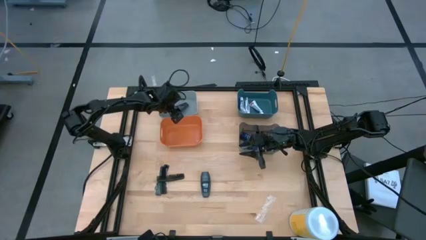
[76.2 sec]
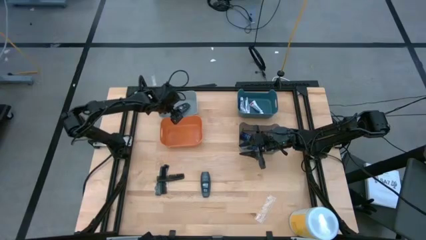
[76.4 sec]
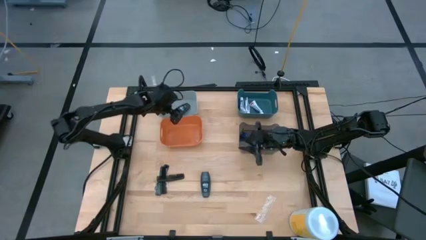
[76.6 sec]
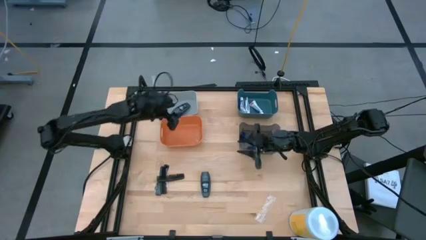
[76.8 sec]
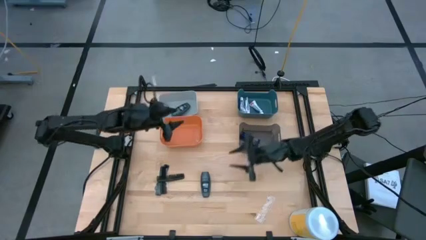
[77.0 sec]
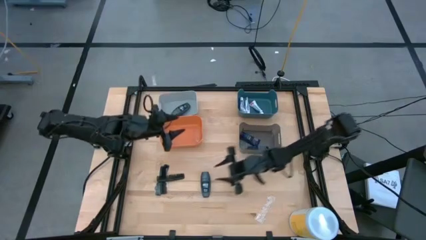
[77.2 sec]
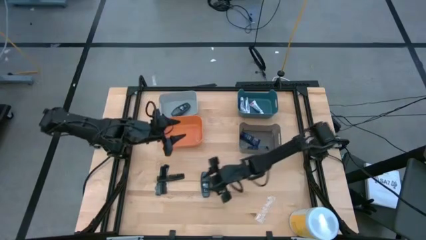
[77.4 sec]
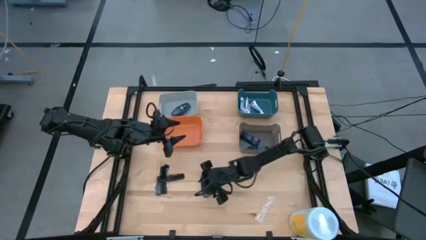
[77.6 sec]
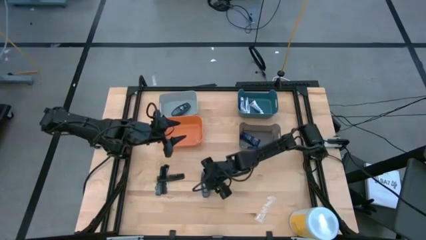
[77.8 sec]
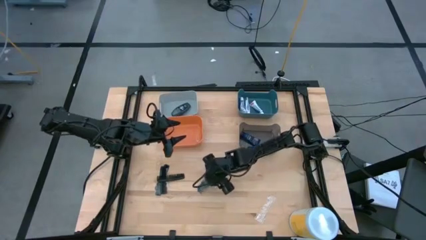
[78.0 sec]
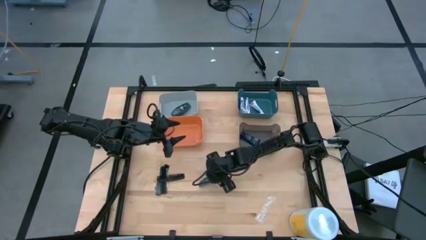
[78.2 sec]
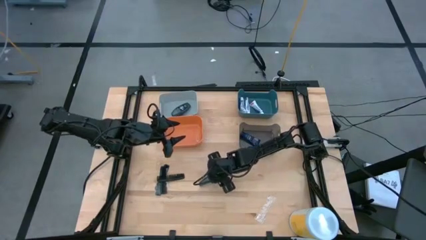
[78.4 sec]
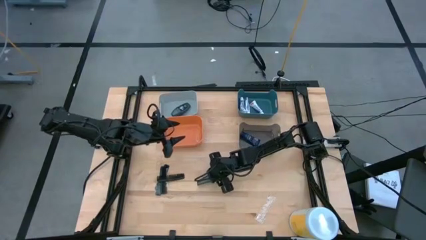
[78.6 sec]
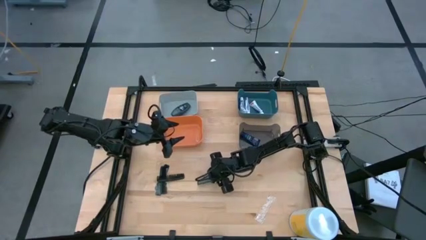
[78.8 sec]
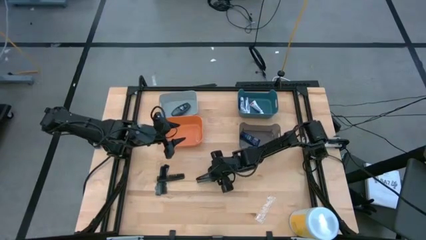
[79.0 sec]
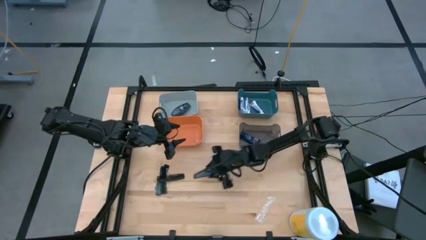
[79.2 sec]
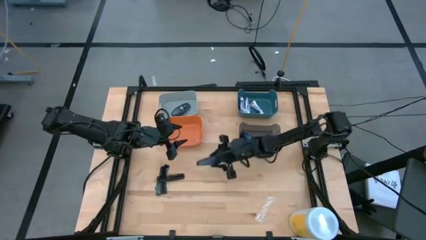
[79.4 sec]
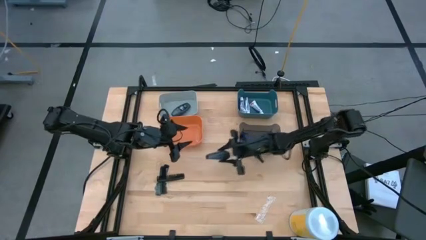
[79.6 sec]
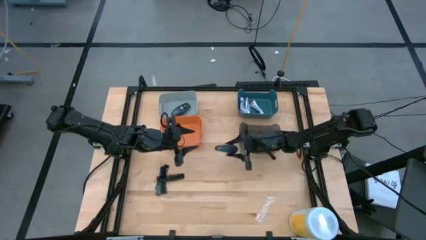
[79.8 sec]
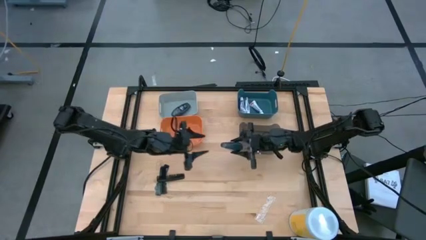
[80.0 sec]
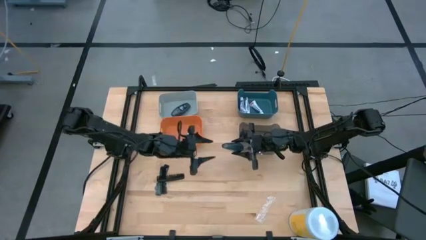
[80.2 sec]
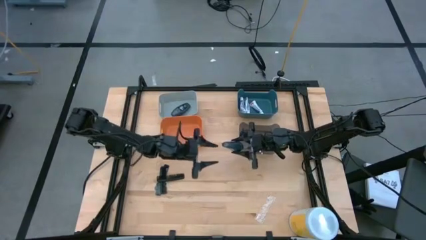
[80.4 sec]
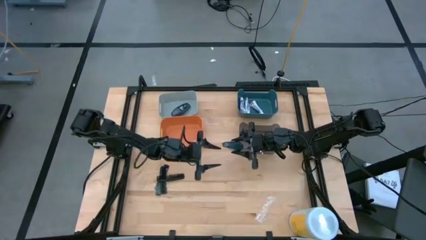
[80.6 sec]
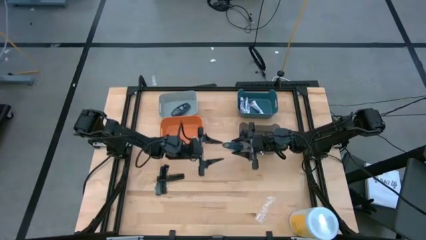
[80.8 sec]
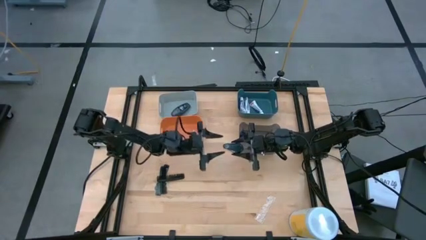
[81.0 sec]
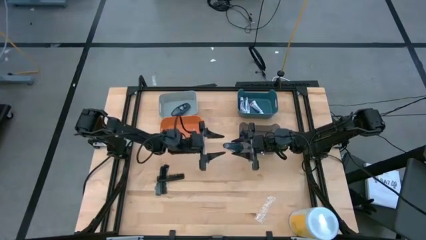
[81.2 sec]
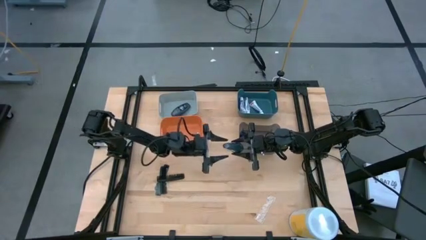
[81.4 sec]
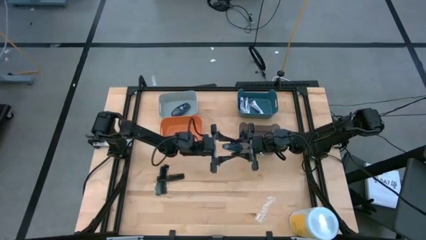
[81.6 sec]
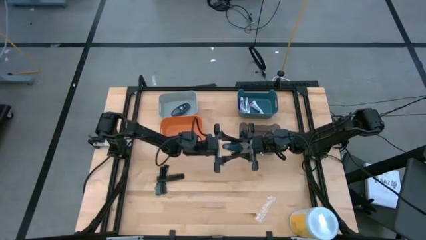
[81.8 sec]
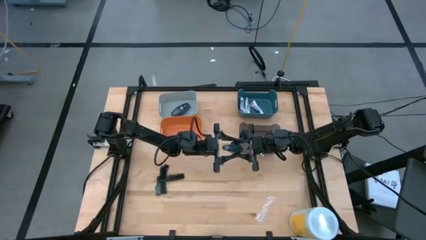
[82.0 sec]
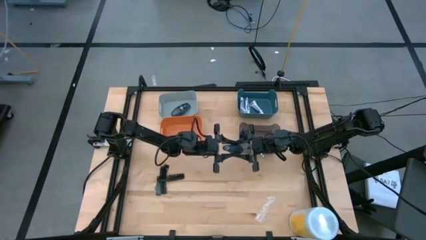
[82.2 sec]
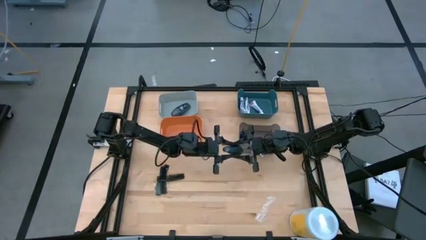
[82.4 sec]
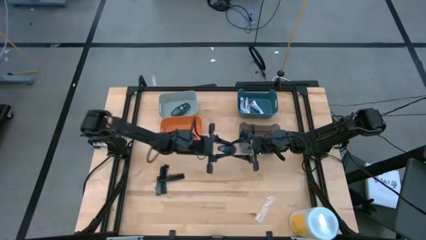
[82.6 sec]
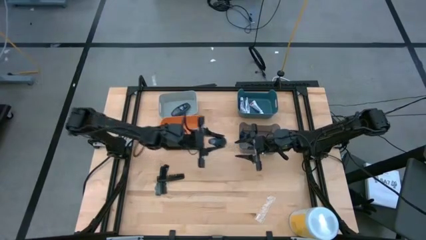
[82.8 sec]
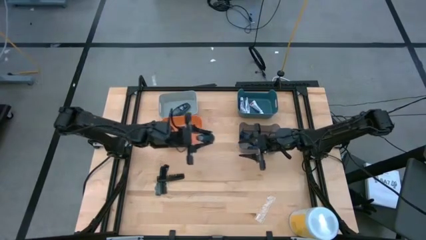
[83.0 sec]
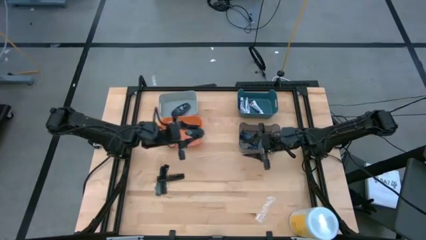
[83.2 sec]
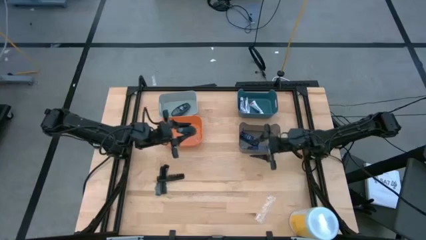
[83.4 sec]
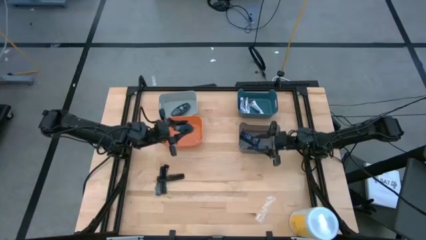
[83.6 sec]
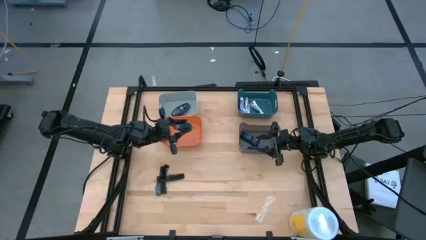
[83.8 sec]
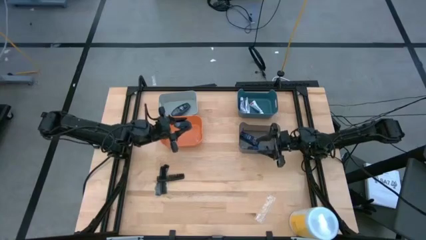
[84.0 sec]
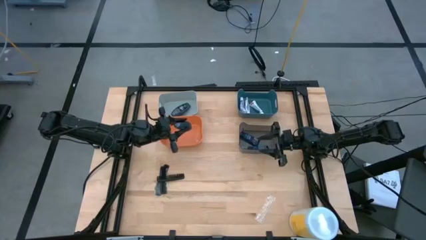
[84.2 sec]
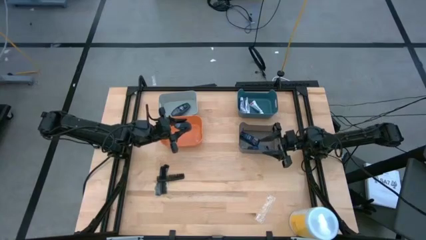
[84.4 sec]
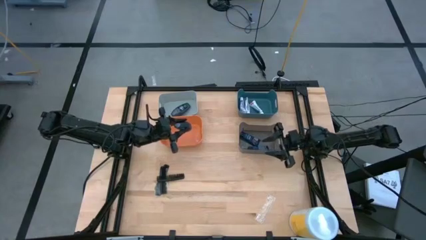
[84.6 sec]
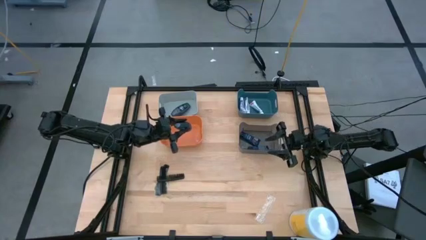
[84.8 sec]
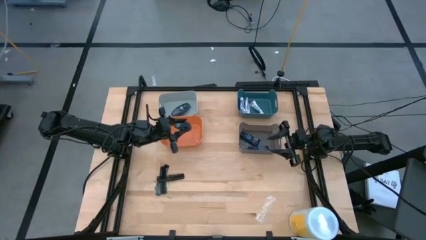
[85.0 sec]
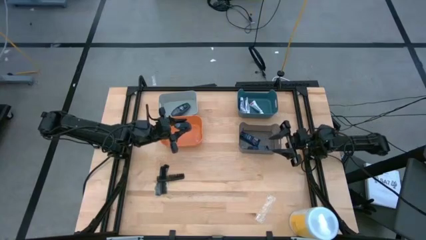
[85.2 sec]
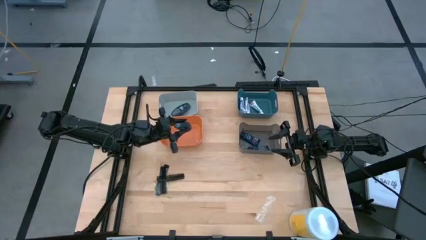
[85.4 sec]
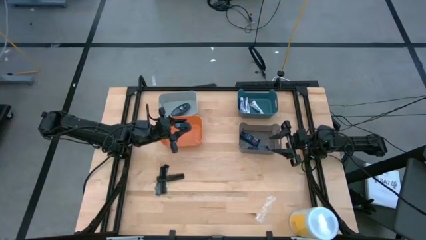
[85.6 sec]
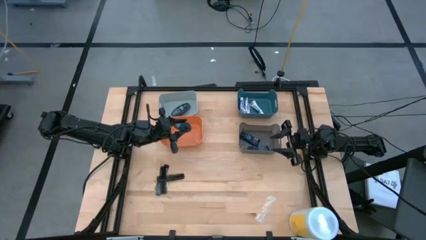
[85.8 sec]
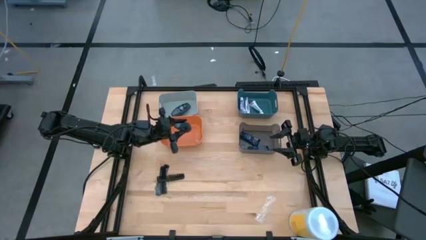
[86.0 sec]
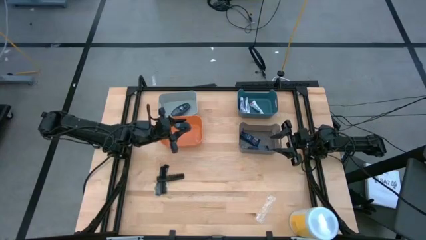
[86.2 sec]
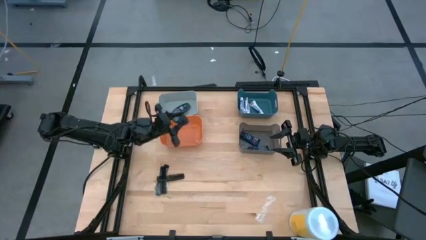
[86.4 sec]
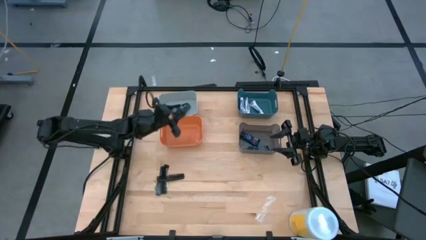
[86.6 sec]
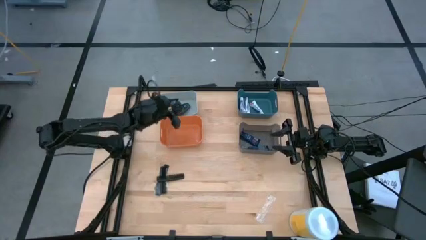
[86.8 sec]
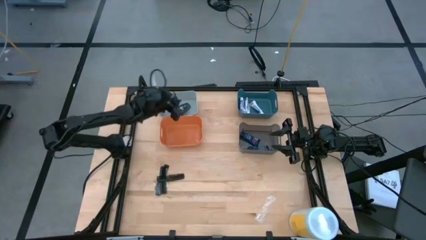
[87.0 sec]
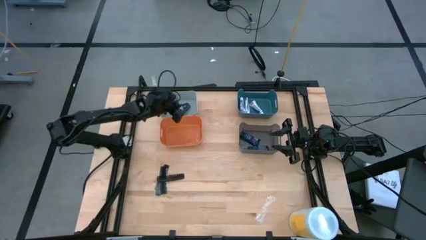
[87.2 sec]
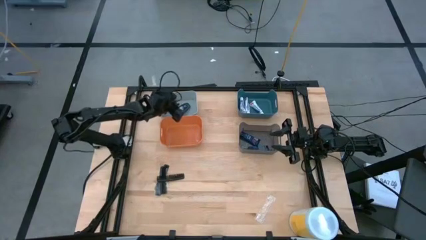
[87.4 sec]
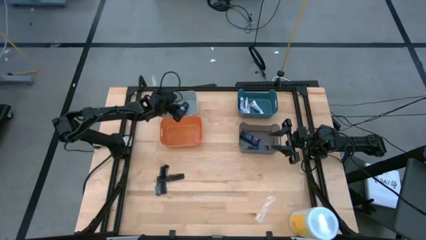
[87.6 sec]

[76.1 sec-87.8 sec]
Task: Pick & Place Travel size toiletries
Put the gray deodorant into the gray bin

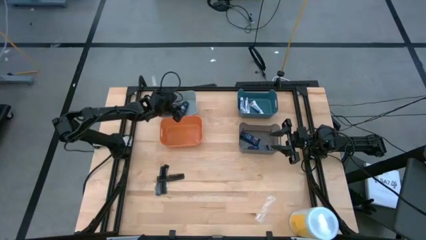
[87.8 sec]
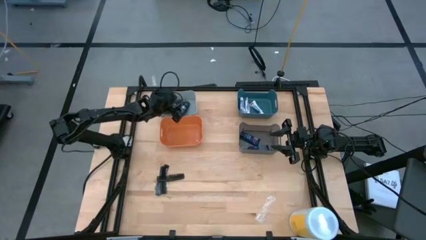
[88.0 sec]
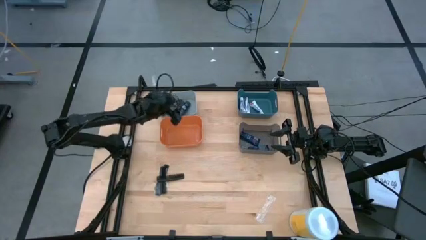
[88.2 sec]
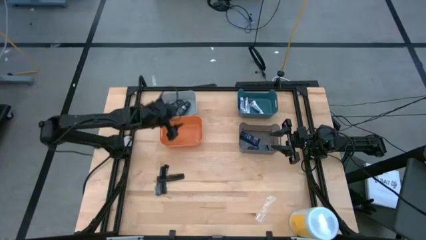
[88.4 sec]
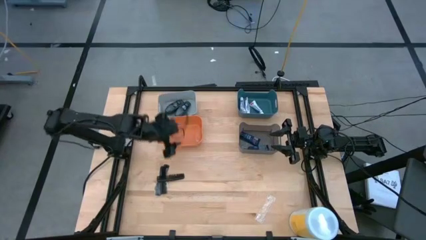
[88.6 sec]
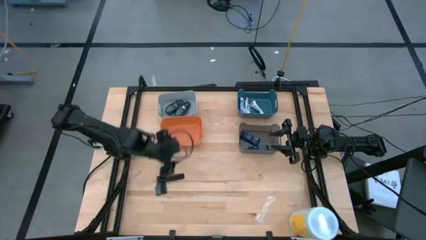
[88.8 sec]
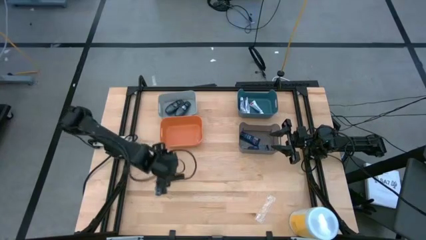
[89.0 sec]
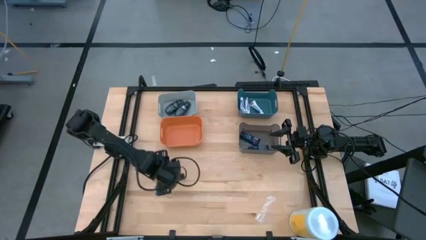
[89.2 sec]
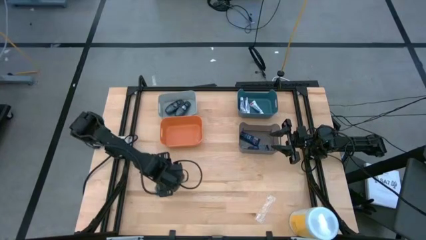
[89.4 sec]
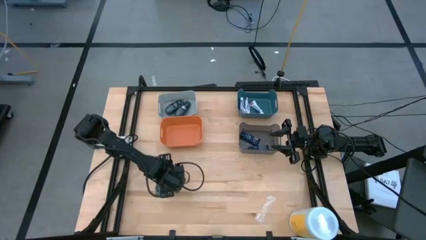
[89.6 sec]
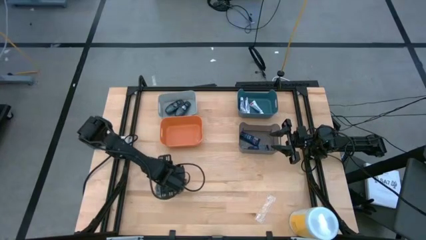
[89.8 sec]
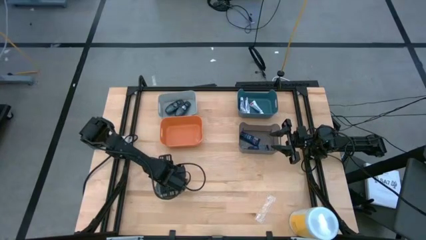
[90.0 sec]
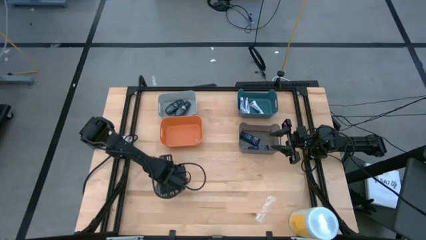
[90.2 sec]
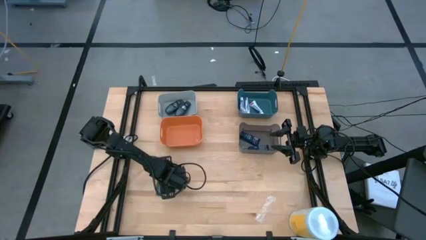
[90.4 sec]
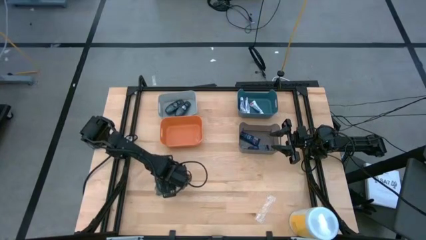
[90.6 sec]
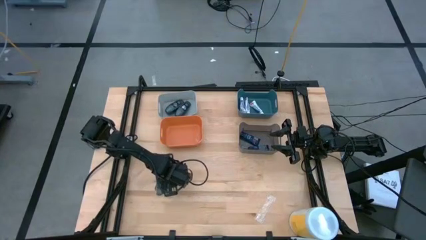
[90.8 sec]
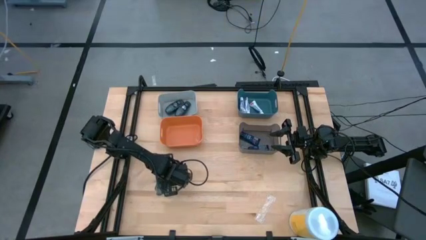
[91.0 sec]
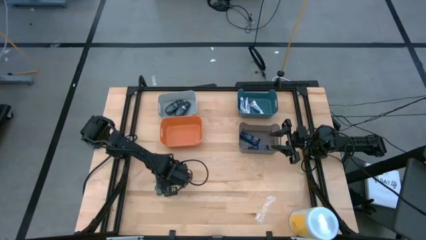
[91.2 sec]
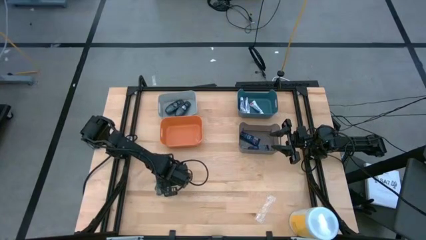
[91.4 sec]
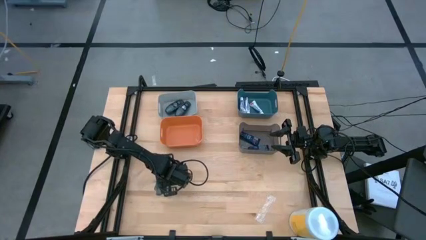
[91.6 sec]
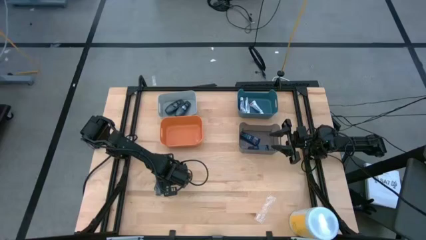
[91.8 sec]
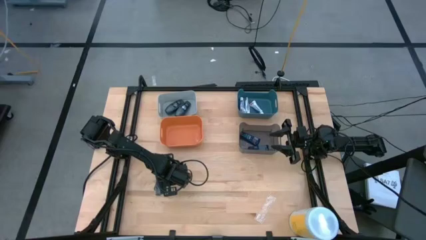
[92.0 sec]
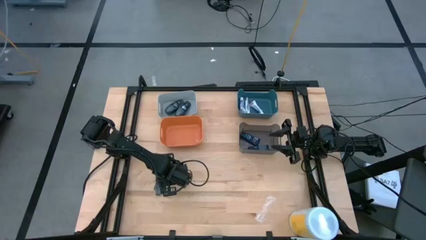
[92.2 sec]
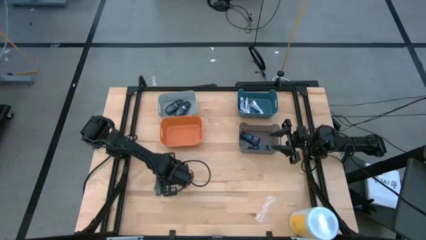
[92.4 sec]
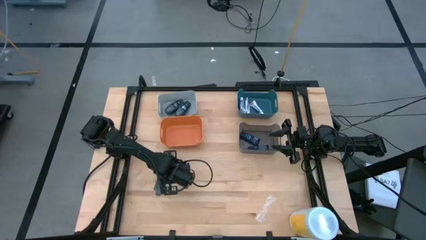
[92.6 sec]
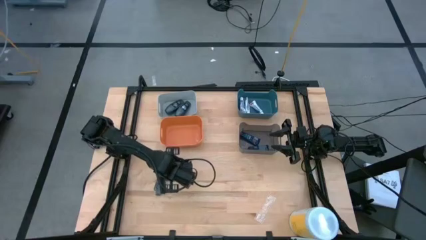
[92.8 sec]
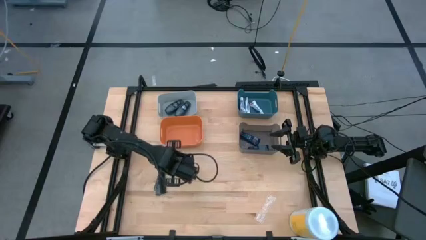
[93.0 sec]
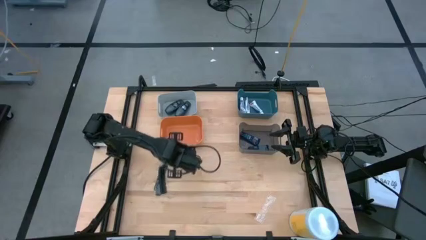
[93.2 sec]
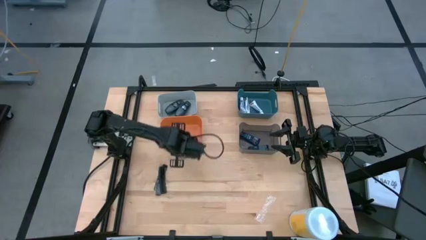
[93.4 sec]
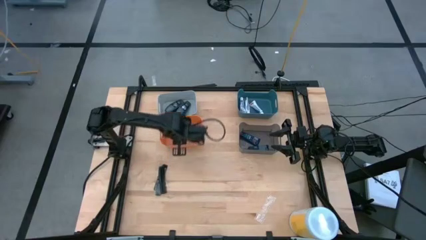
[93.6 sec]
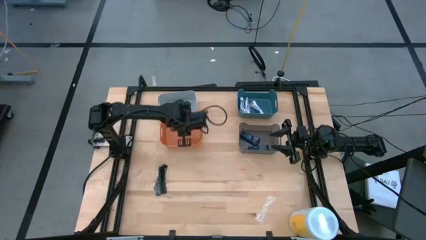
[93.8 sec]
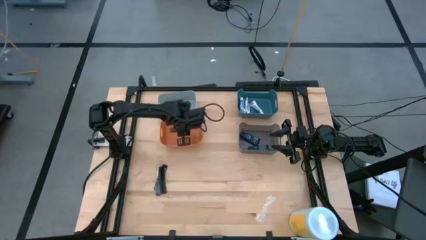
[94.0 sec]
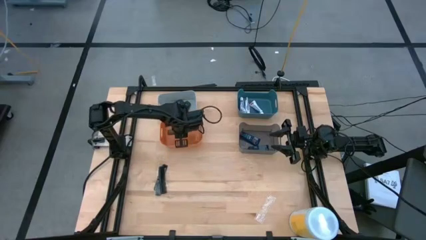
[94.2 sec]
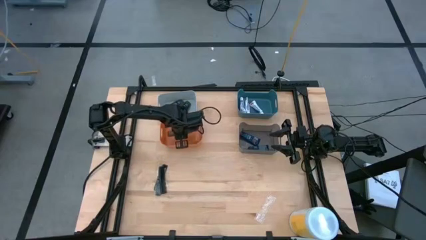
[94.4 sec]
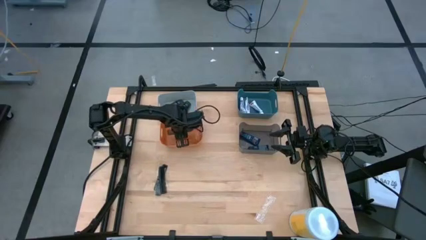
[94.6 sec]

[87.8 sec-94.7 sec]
Put the black comb into the orange bin
